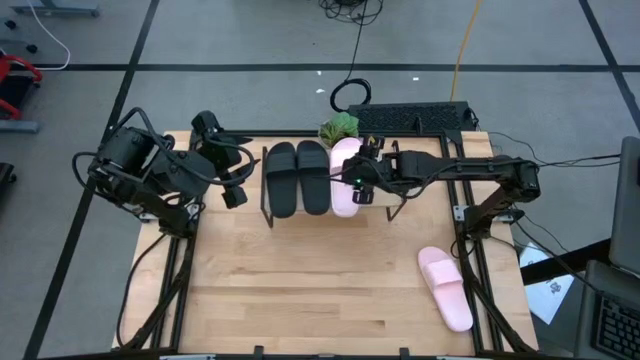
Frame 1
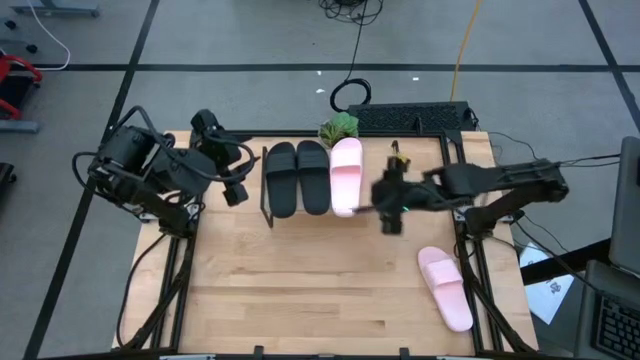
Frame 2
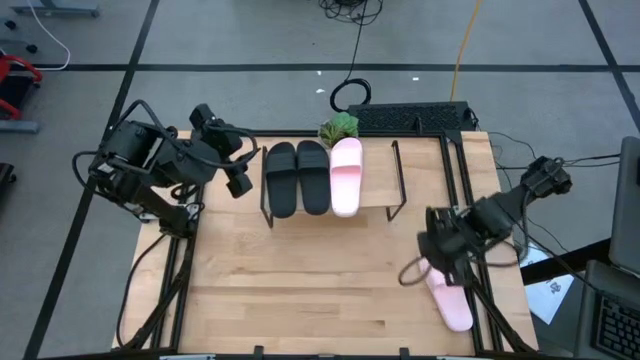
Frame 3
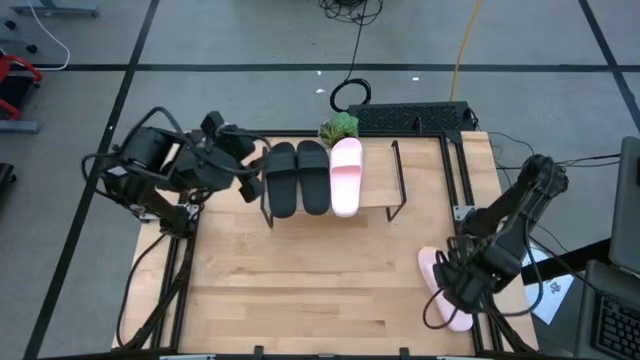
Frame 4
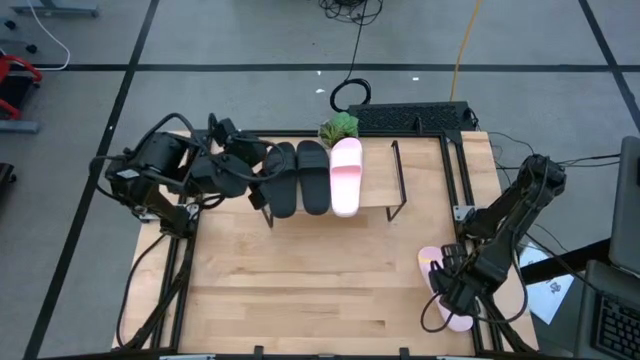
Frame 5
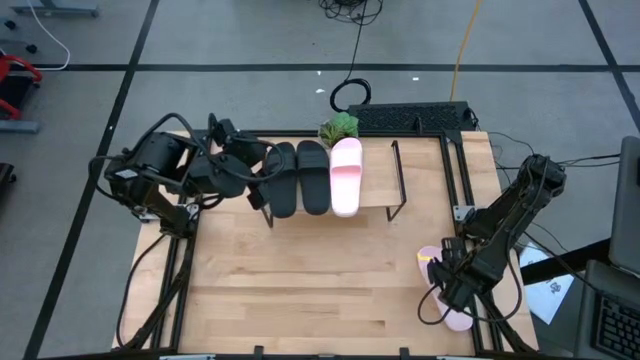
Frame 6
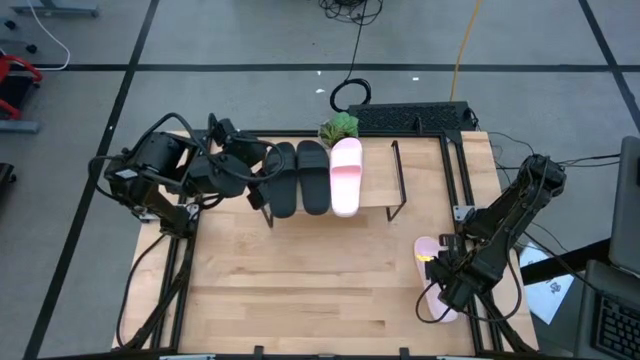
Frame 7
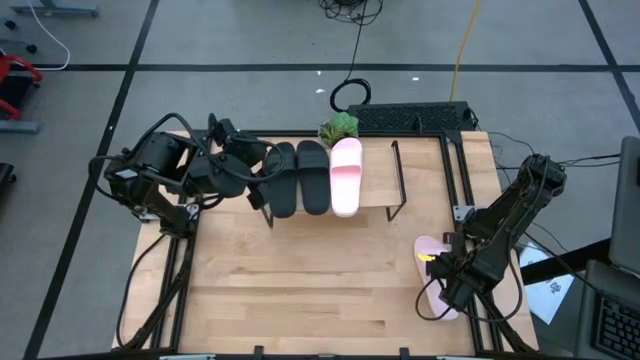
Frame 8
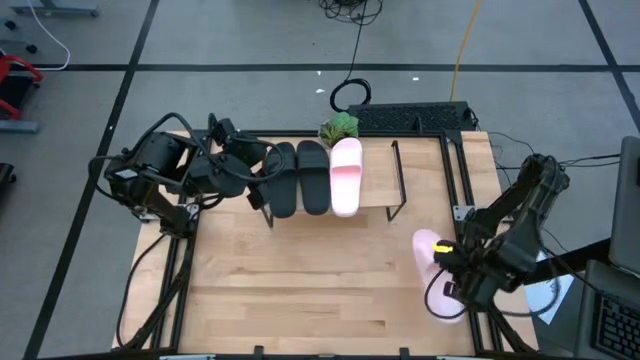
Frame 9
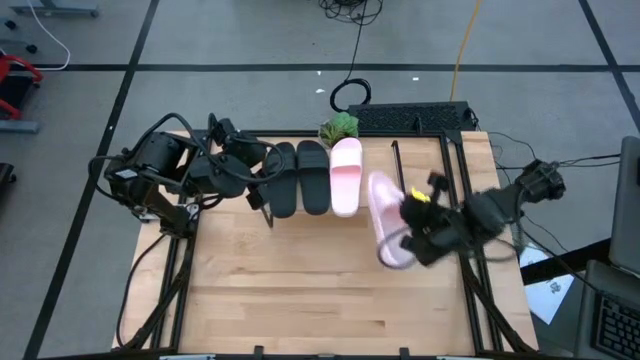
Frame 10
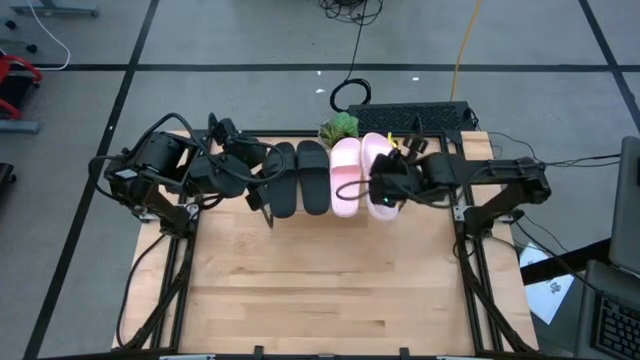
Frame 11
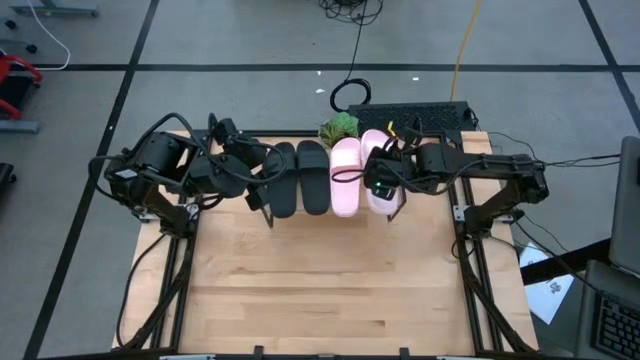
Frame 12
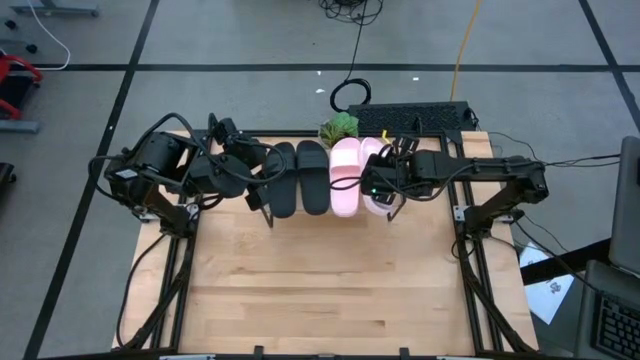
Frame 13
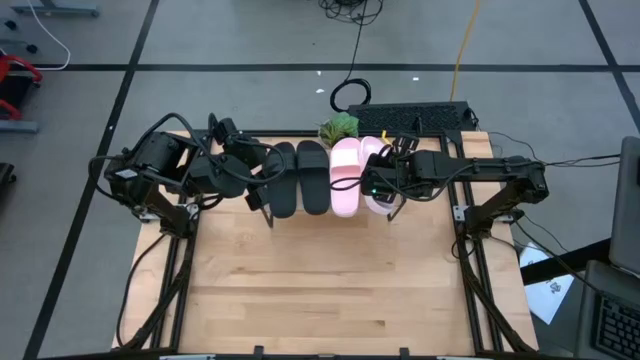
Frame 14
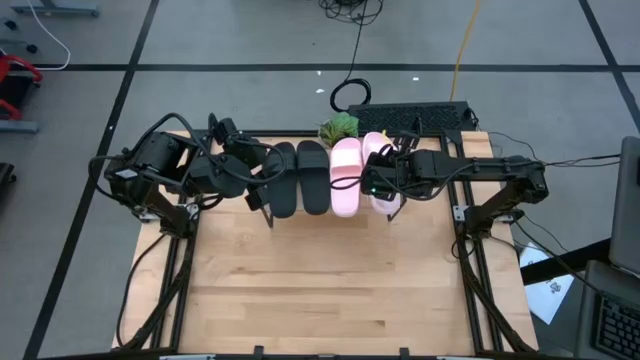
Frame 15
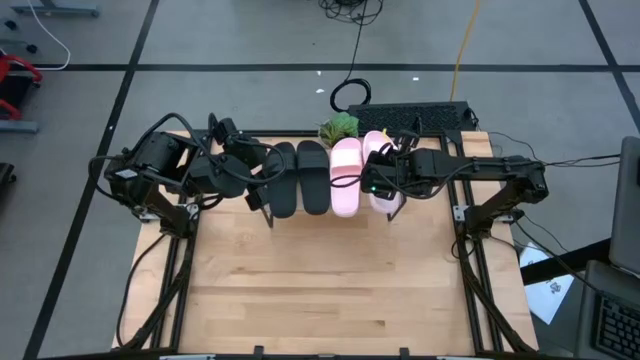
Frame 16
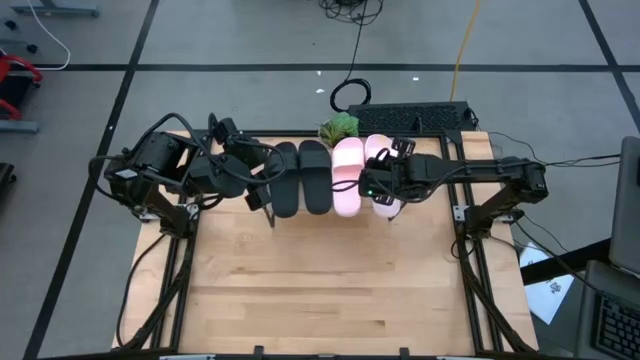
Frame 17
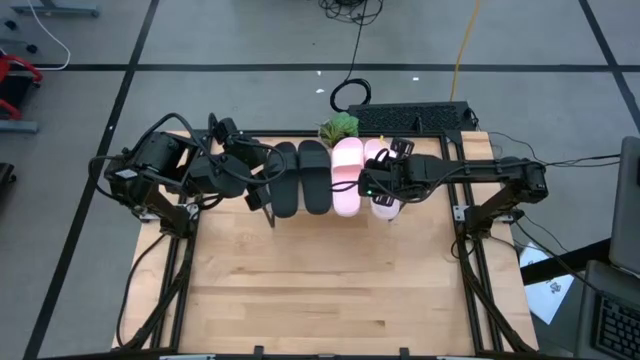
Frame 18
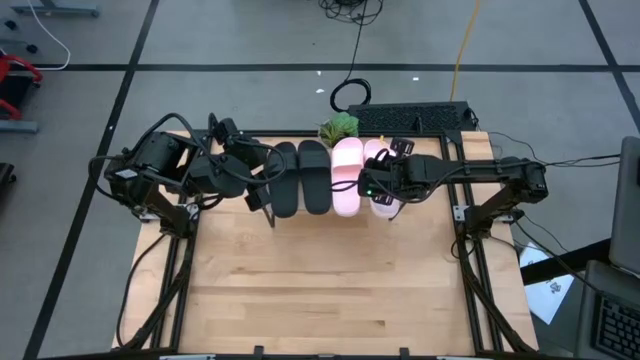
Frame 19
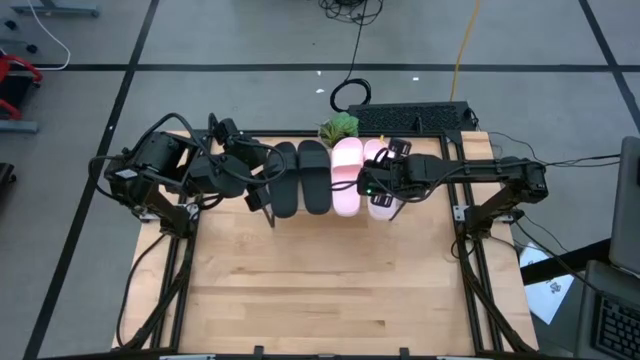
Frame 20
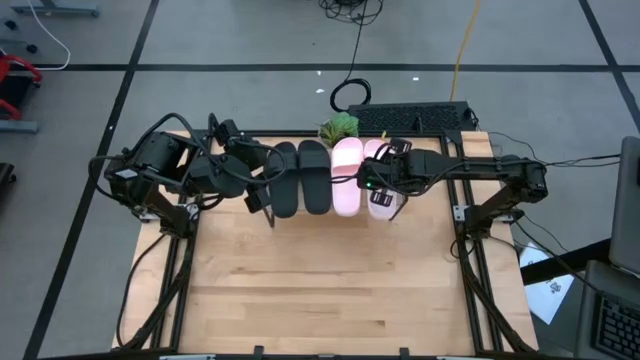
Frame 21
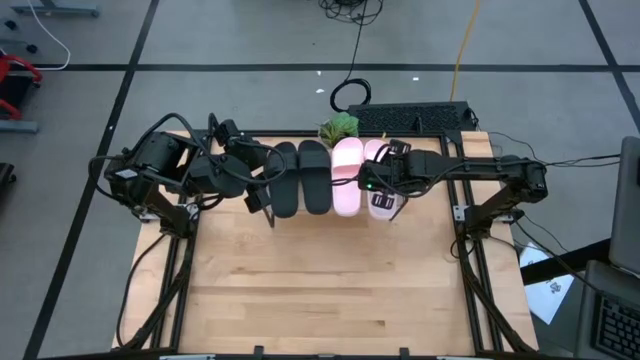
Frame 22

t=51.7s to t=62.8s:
Task: Pick and place slides into the shelf
Put the pink slipper on the shelf

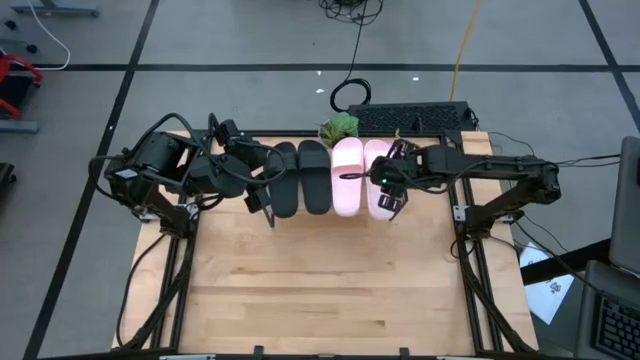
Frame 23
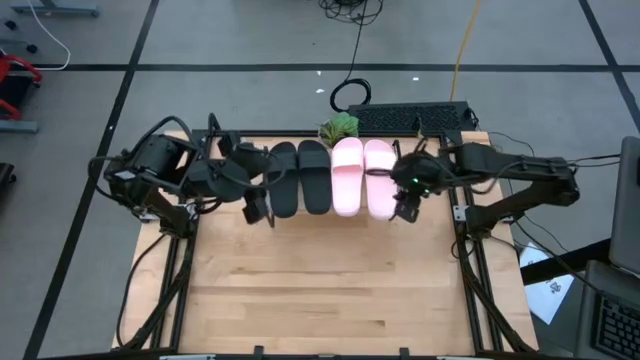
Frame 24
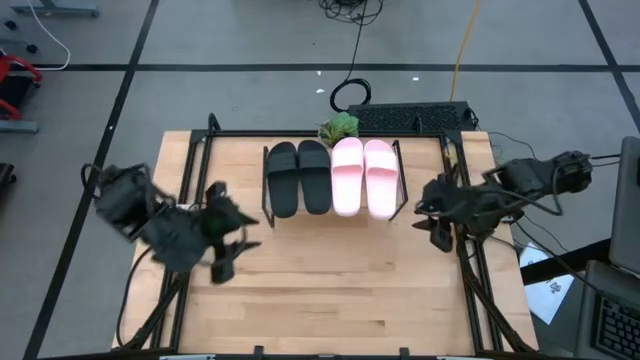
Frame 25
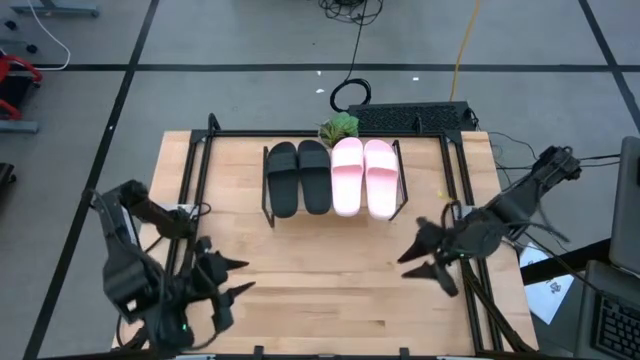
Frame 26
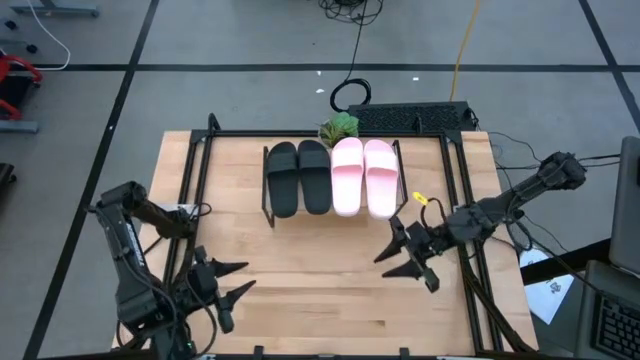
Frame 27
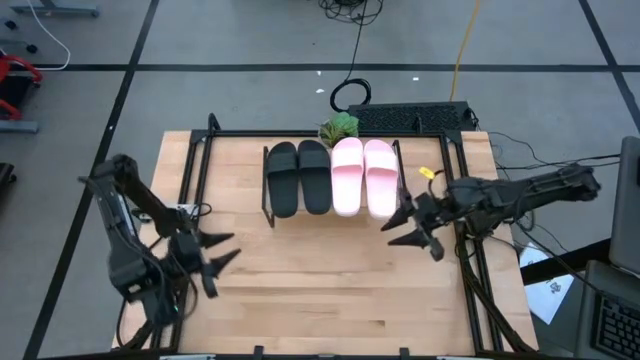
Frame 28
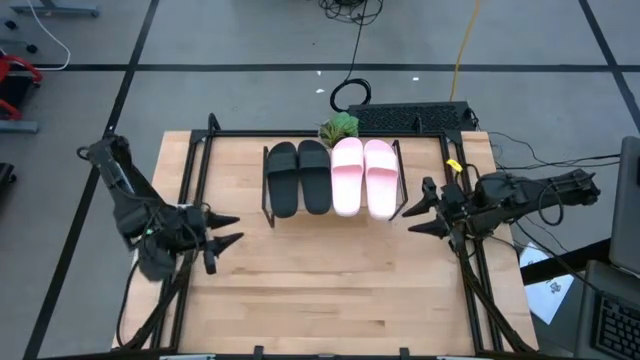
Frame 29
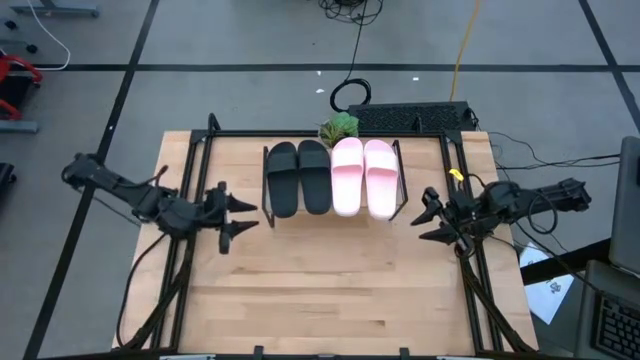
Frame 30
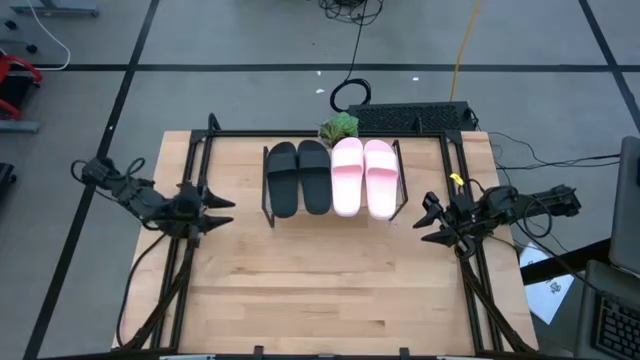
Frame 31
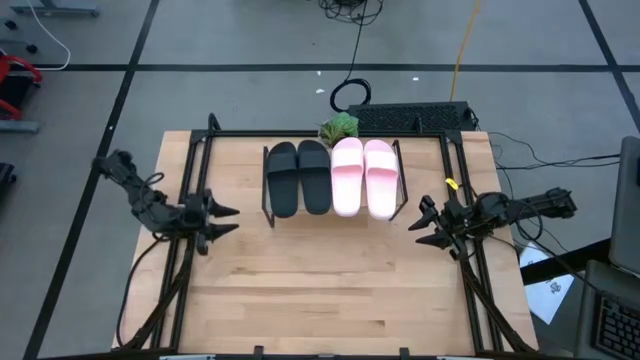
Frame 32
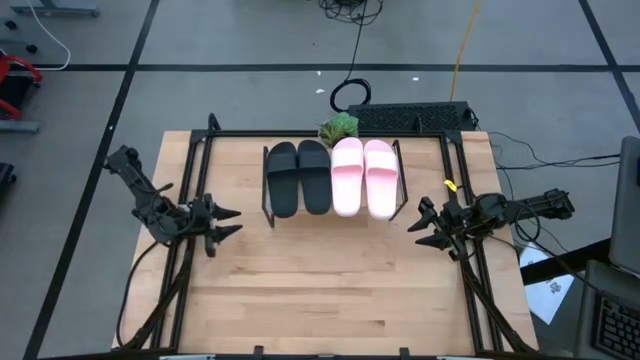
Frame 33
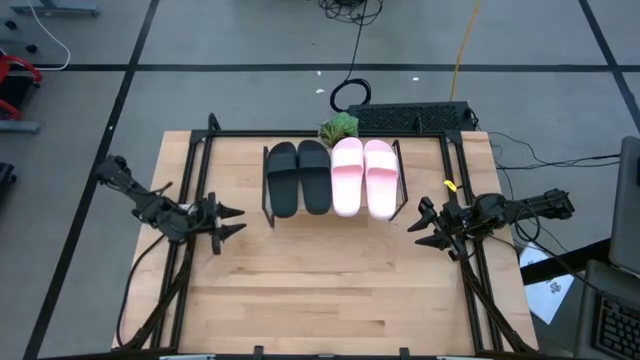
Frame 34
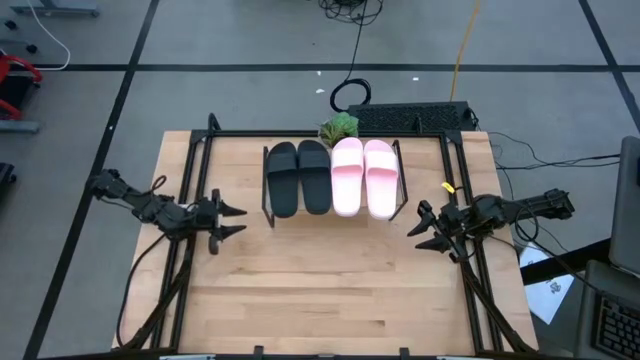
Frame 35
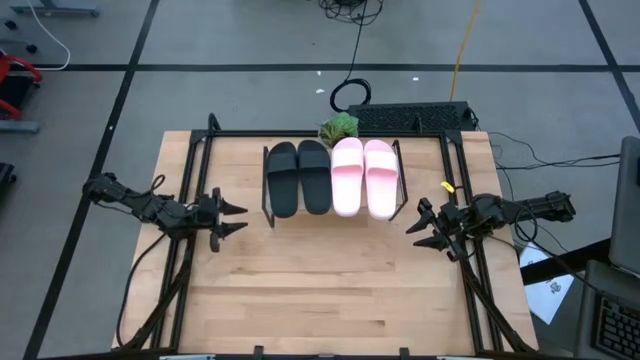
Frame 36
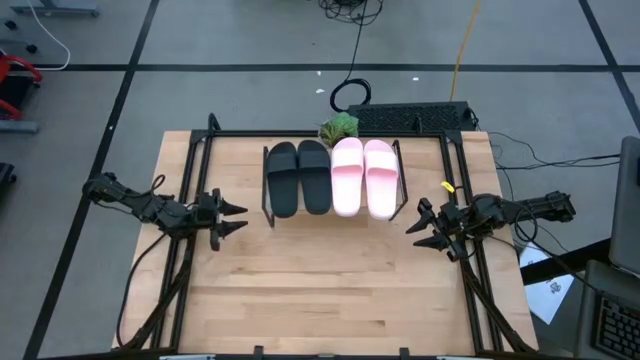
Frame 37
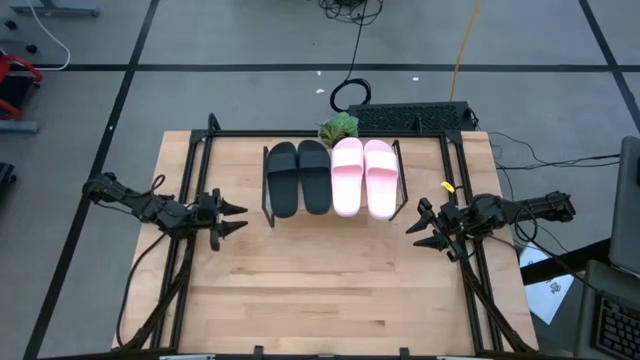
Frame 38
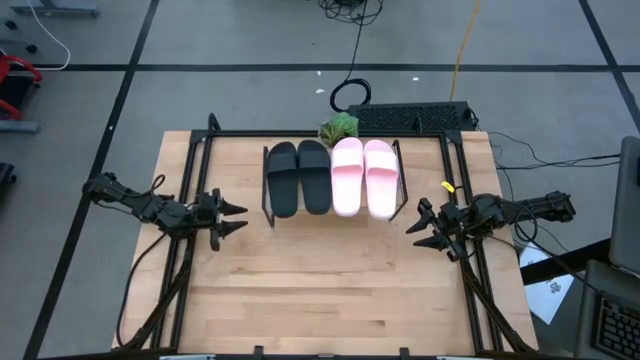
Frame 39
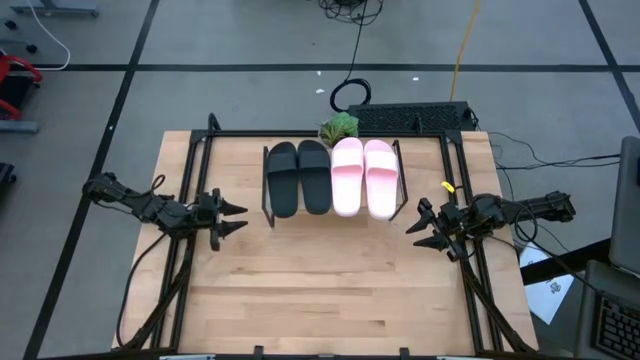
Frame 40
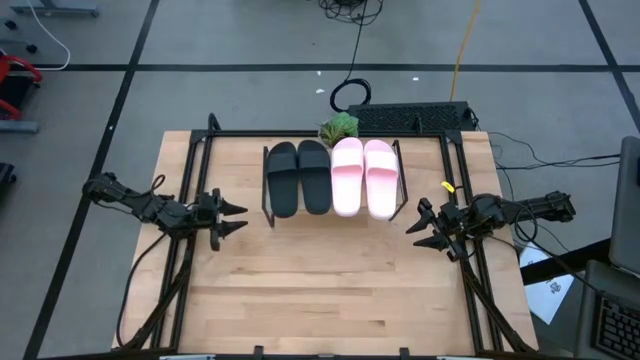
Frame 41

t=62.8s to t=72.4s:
Return to Home Position
